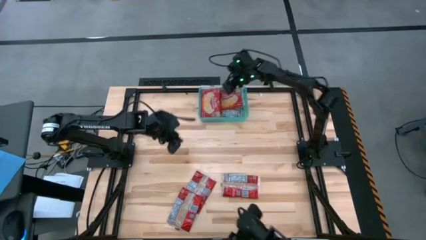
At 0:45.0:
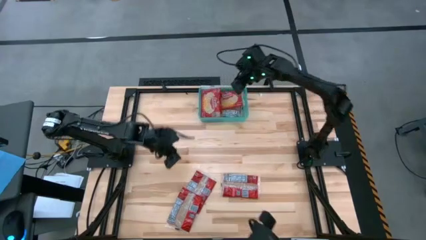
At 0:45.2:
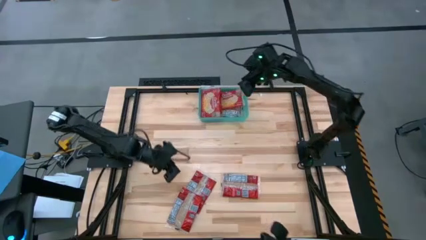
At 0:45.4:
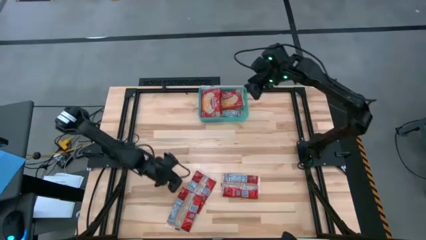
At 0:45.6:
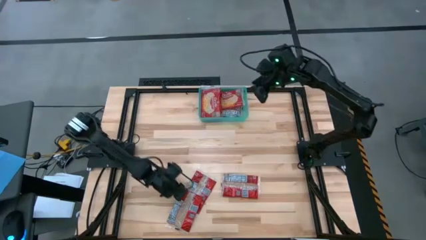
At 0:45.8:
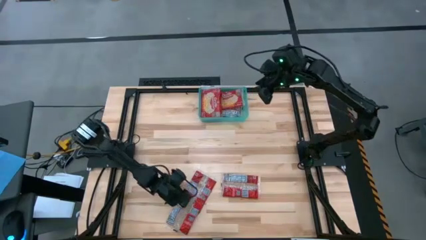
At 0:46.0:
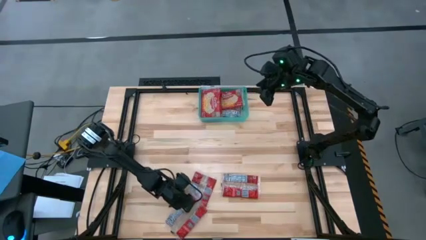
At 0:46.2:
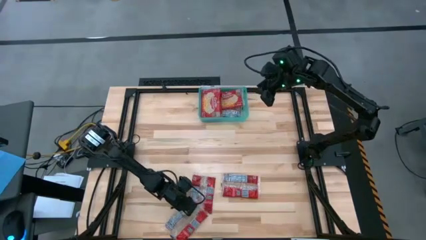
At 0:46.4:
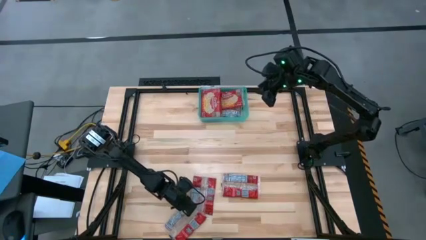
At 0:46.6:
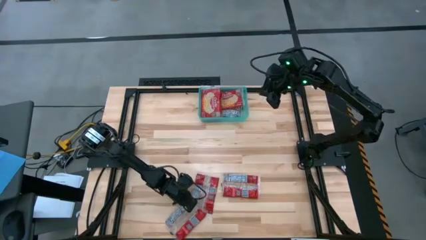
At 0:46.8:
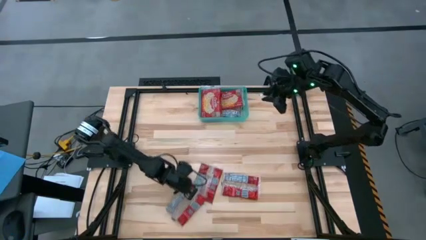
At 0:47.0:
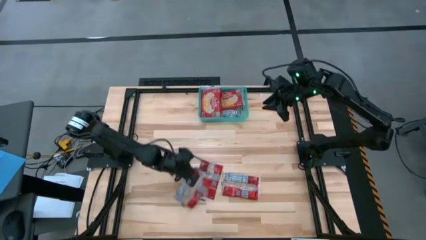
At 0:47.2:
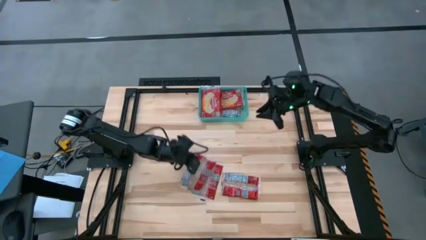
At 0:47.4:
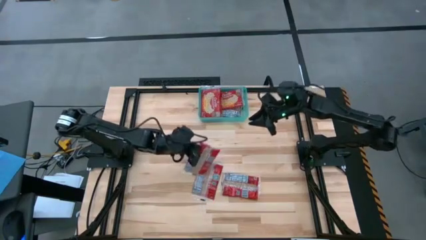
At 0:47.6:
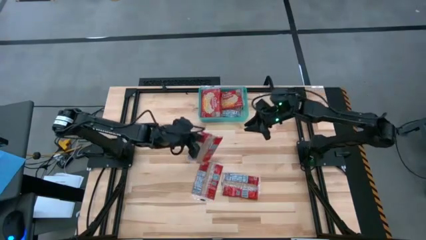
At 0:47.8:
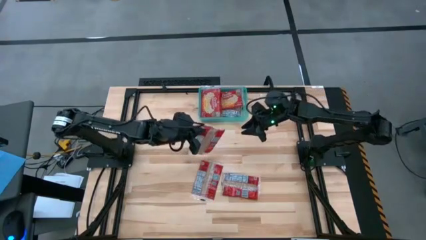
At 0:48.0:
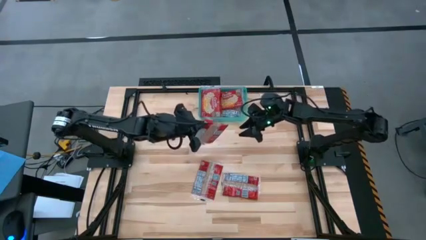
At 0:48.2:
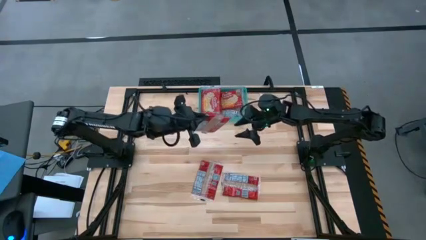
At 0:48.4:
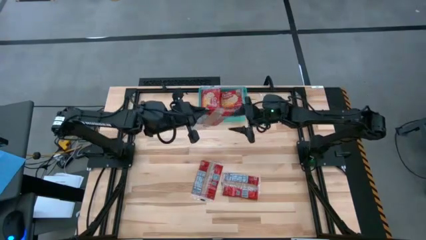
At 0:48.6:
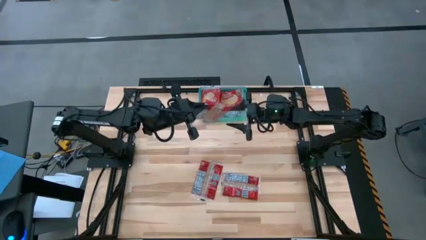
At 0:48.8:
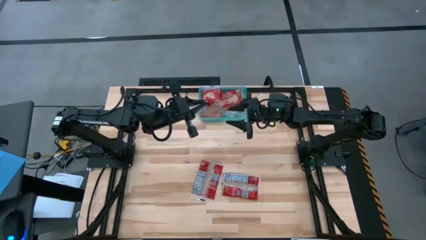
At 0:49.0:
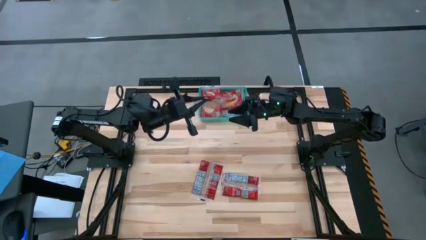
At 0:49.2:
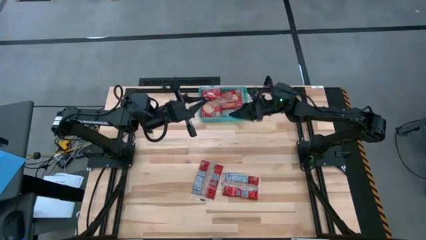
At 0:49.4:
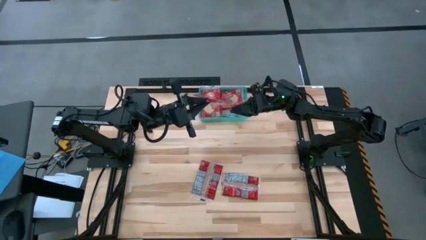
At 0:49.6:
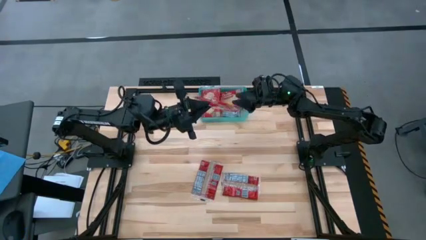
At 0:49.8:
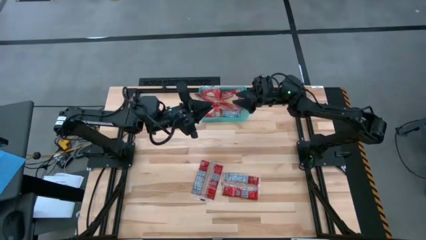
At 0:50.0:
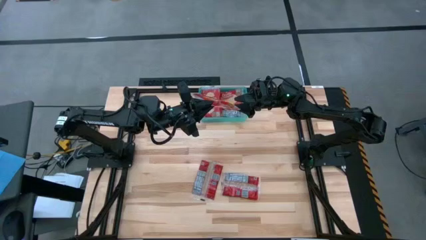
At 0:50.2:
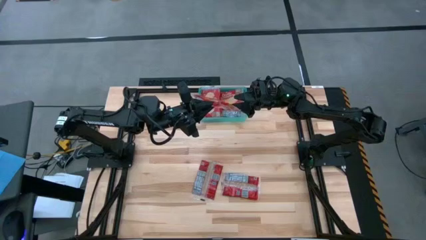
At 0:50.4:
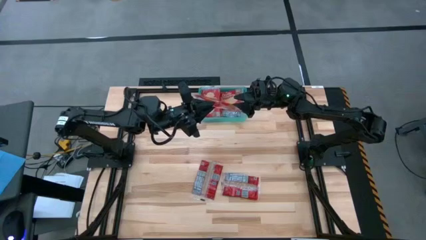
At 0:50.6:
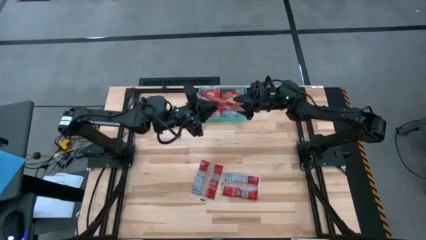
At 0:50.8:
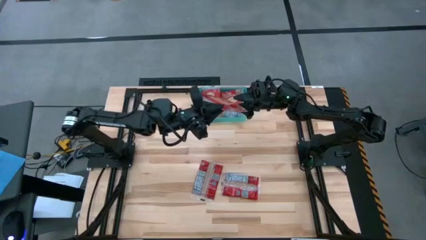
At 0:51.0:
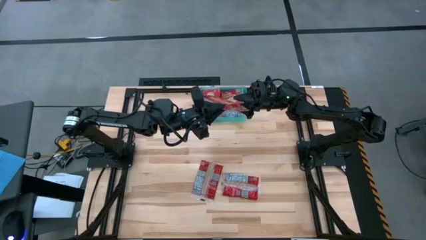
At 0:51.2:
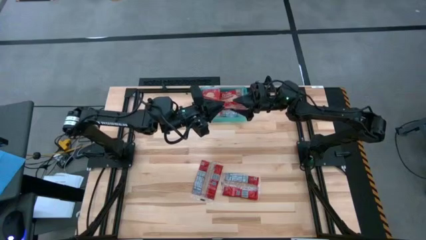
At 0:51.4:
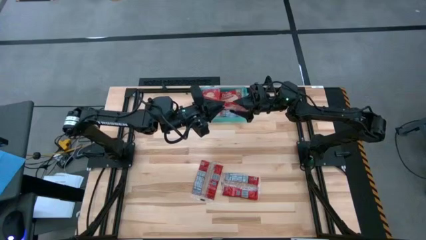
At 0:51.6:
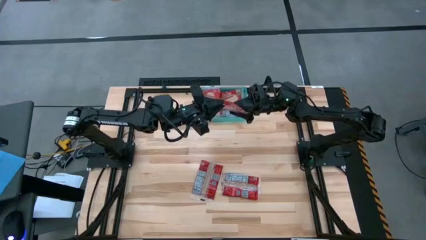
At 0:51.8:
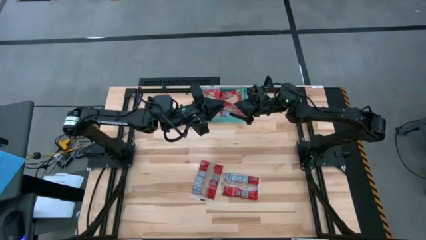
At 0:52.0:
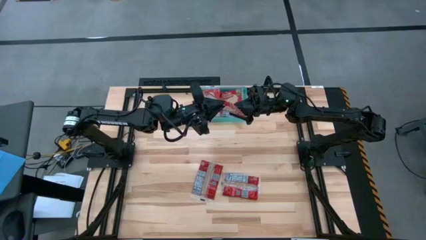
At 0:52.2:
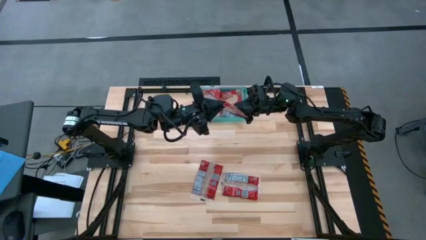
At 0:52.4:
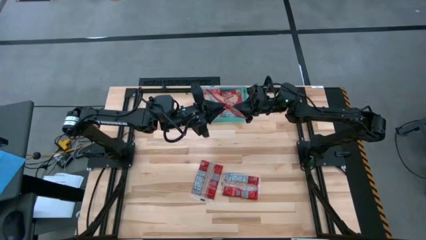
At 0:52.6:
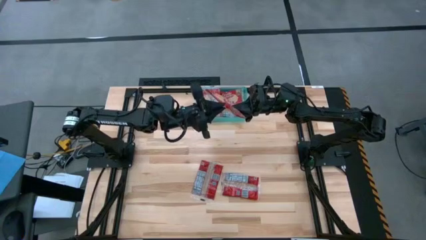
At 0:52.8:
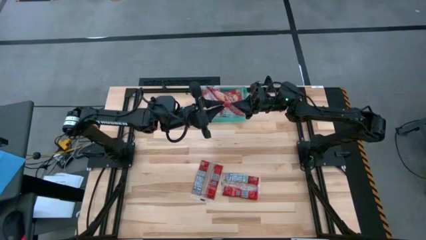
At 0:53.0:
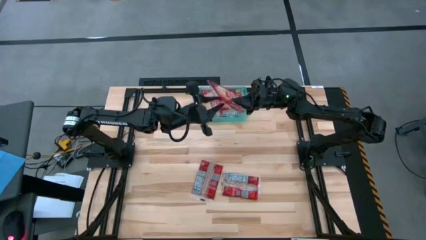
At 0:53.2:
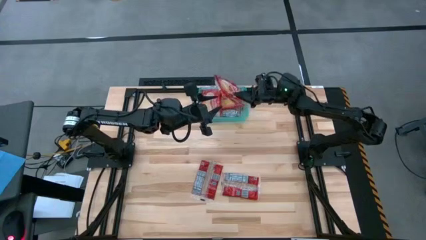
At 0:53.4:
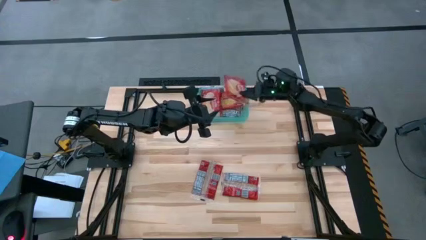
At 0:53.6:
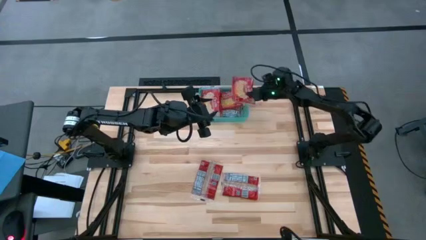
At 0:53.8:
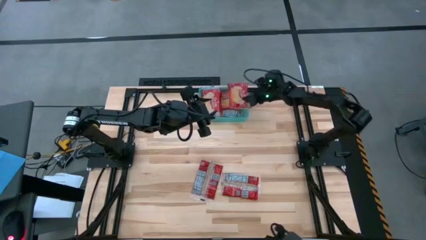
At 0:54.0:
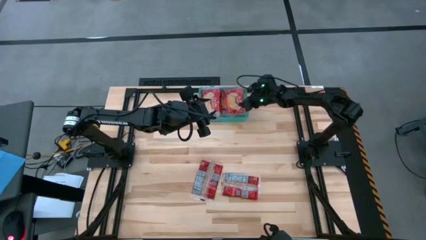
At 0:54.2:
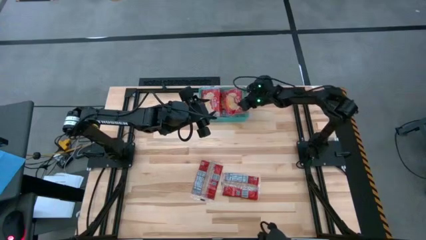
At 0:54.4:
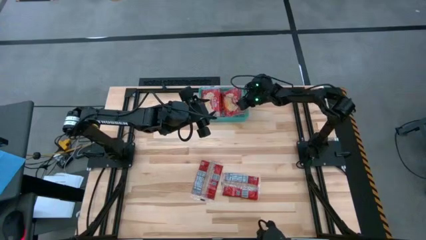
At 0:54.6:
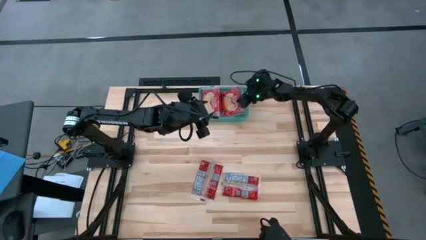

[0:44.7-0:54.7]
Task: Sort popcorn bags into baskets
Put the bottom red popcorn bag into the green bin

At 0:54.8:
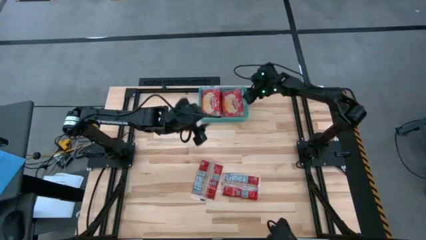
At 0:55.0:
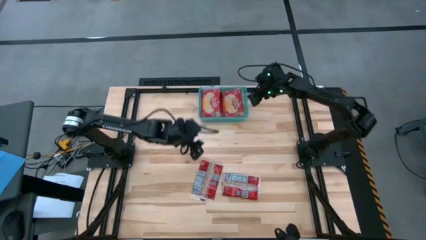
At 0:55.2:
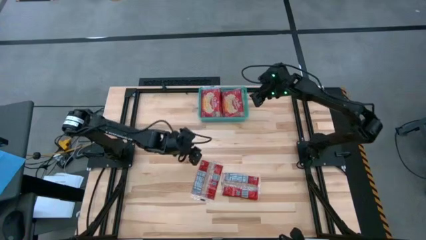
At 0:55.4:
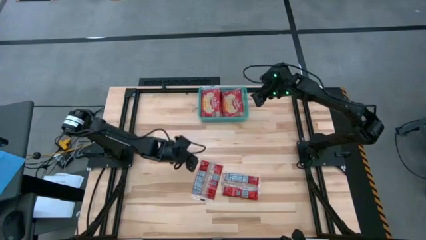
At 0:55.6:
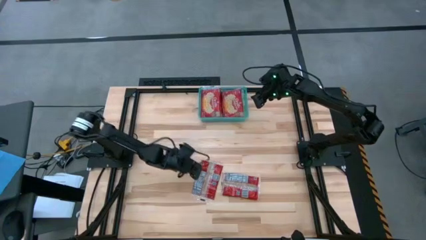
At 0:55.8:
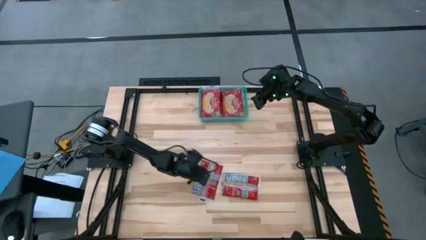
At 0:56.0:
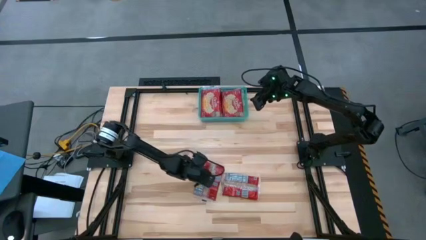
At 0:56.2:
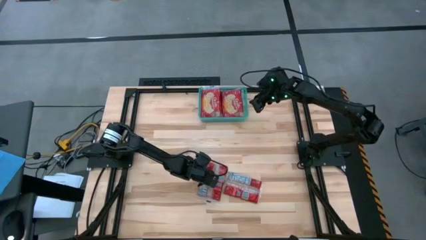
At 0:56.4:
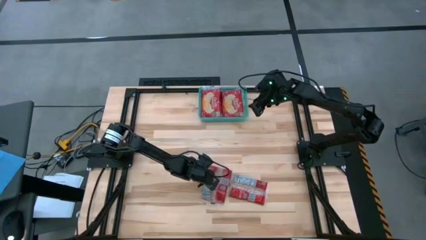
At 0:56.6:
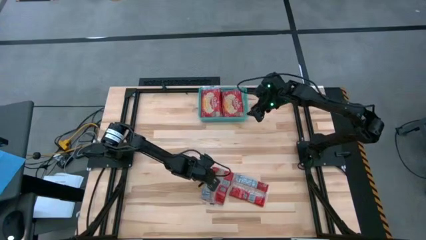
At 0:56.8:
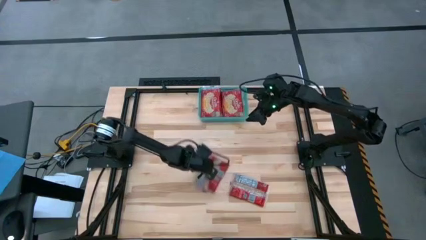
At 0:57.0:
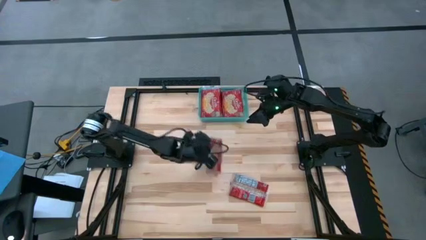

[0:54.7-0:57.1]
Put the left red popcorn bag into the green bin

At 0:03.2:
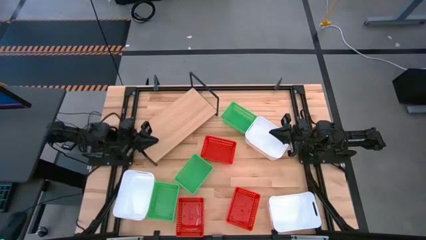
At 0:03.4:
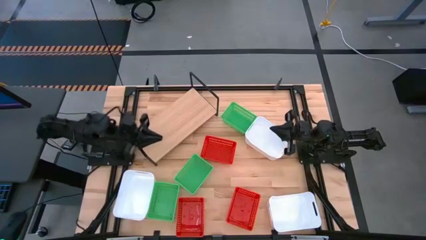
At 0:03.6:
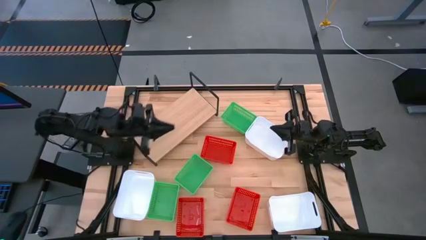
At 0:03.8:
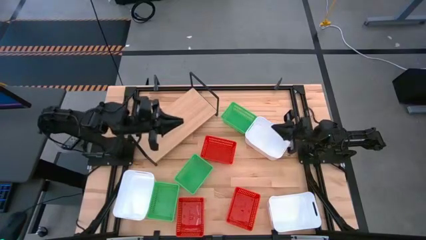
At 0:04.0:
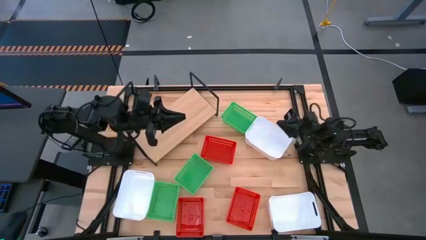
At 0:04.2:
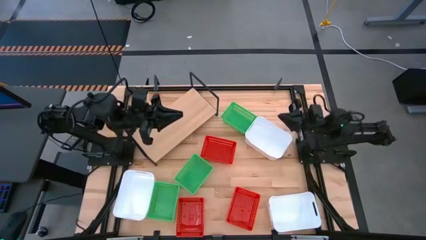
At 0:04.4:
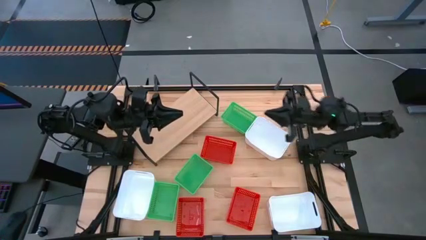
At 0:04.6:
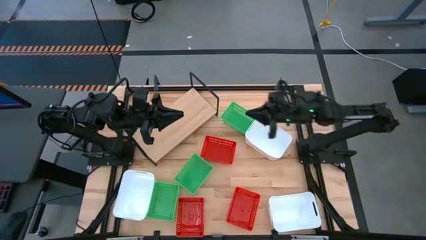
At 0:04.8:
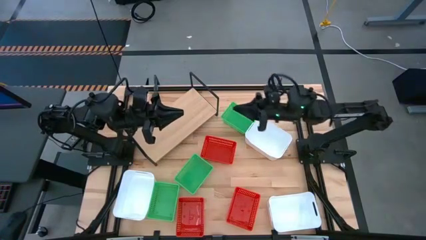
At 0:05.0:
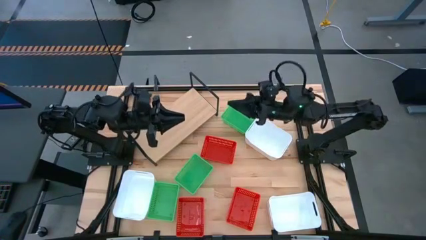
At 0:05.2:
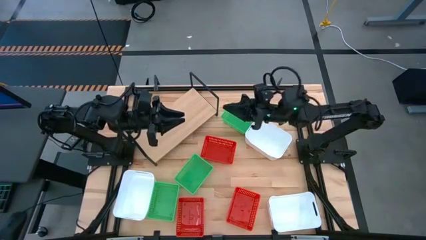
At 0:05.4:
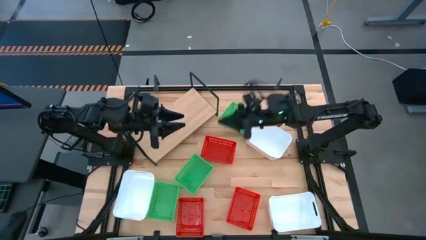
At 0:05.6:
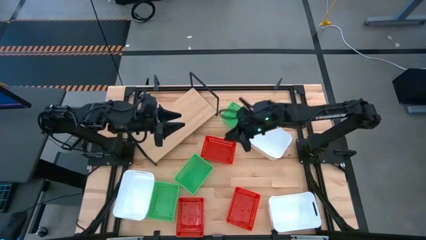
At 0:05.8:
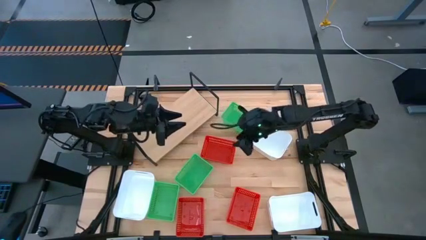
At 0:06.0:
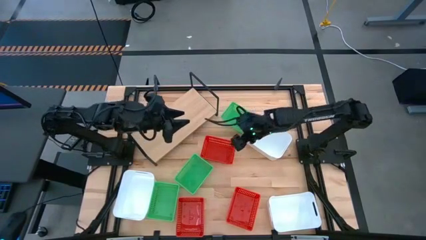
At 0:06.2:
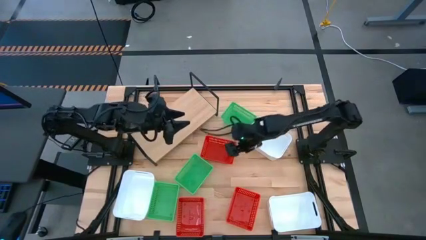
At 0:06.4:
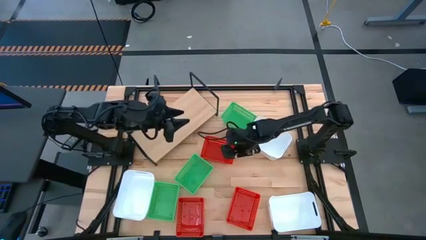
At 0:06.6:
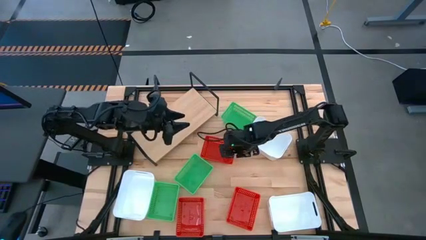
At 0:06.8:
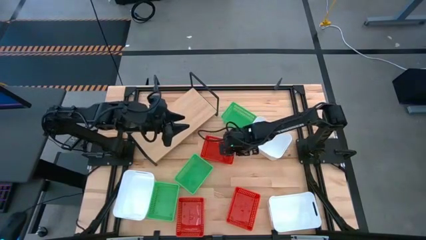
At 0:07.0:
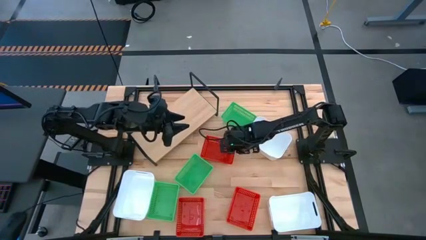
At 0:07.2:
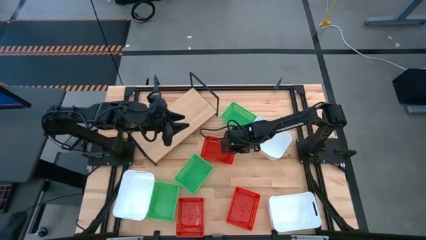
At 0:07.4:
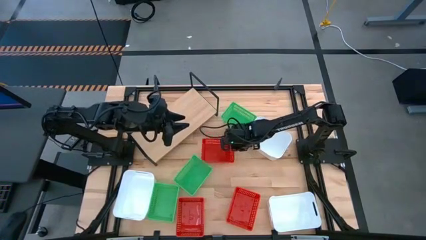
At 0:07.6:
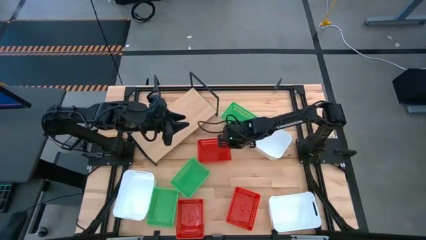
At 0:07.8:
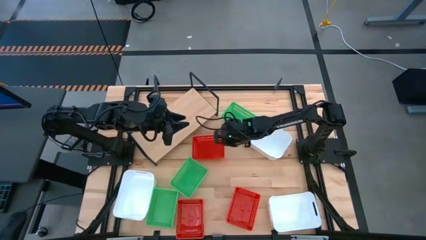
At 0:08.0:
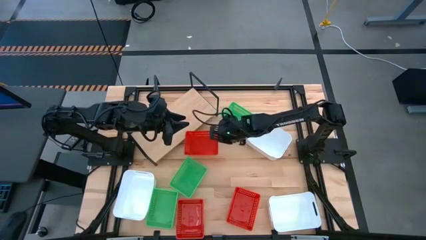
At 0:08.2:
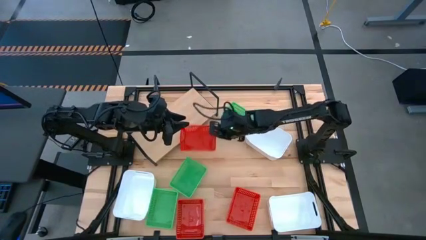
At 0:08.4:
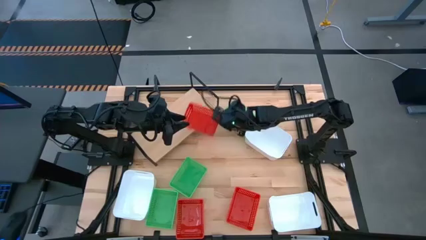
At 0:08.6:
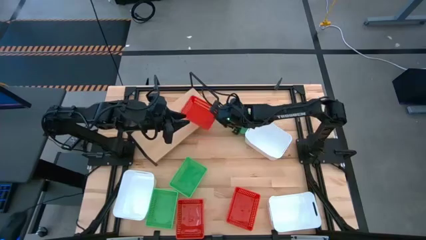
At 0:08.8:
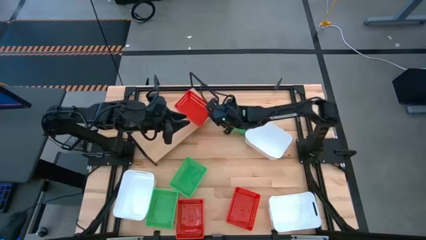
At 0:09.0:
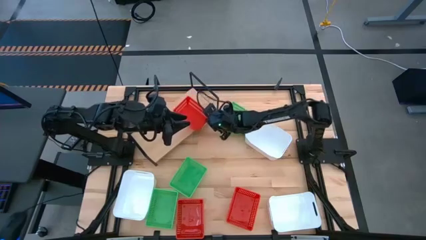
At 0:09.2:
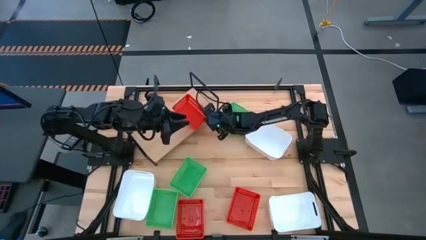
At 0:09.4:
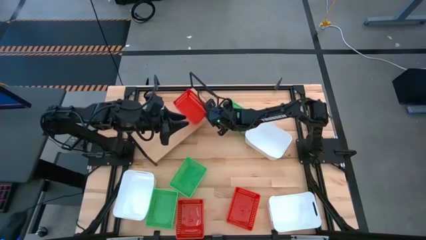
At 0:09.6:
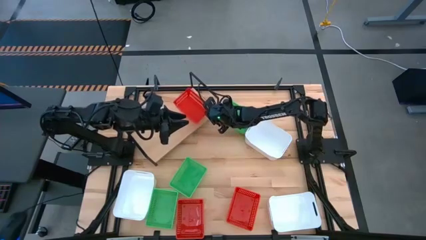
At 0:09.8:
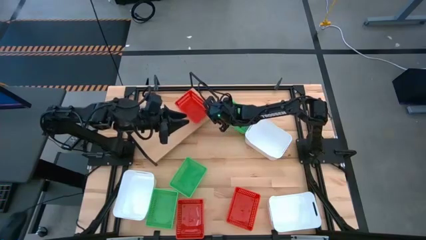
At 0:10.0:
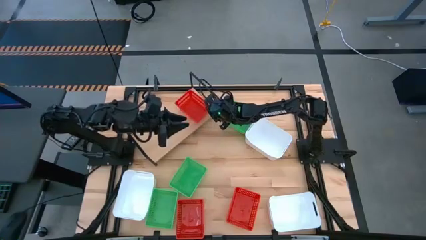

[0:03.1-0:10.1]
Task: Stack baskets on shelf by color
Put the top red bin on the shelf
